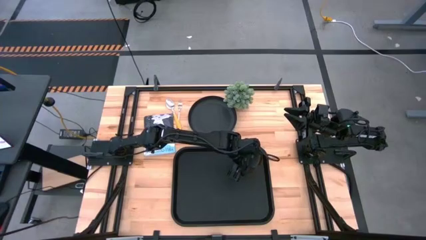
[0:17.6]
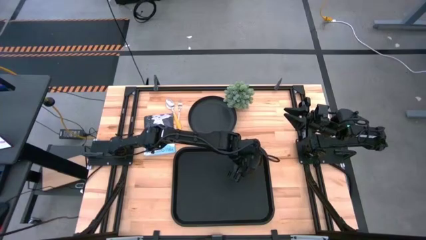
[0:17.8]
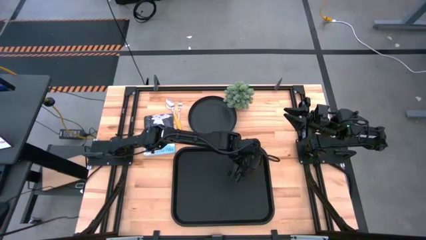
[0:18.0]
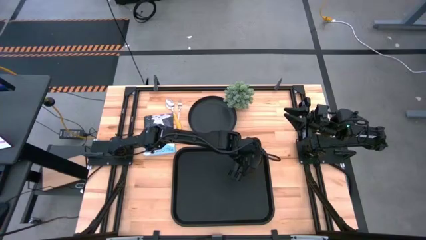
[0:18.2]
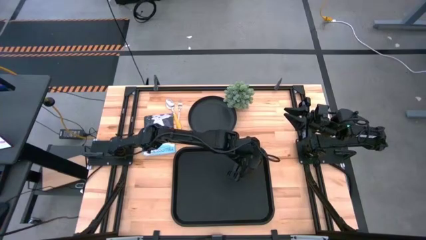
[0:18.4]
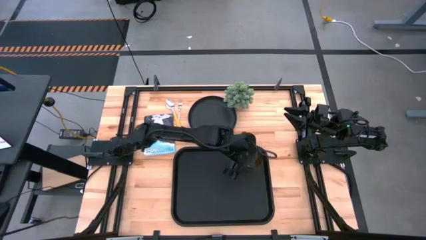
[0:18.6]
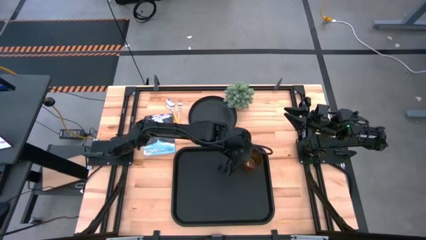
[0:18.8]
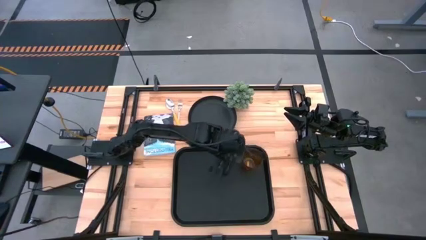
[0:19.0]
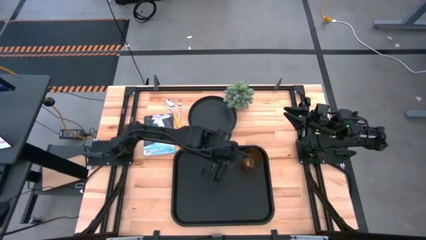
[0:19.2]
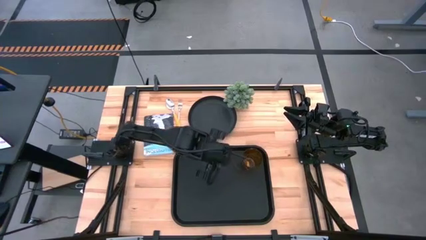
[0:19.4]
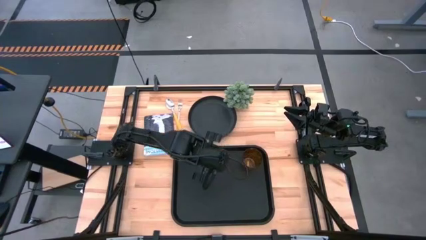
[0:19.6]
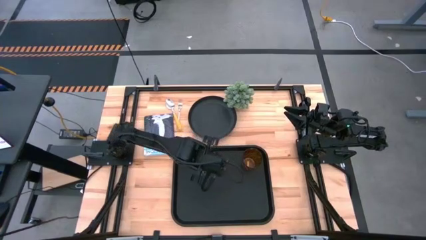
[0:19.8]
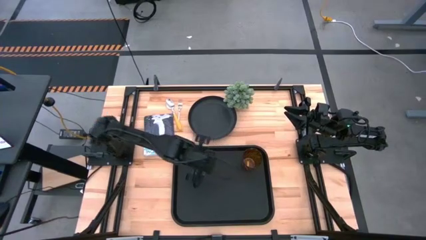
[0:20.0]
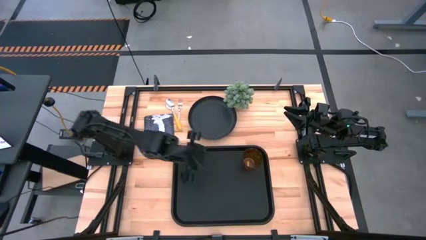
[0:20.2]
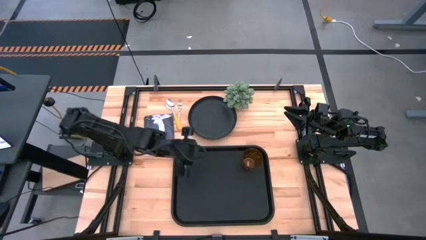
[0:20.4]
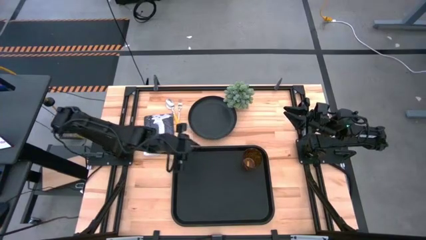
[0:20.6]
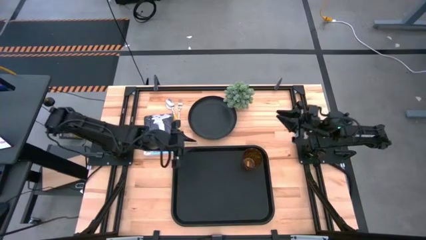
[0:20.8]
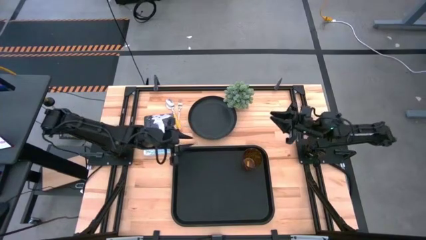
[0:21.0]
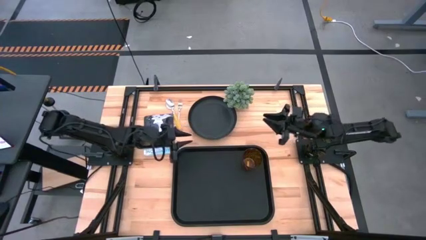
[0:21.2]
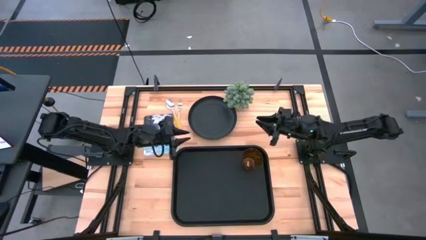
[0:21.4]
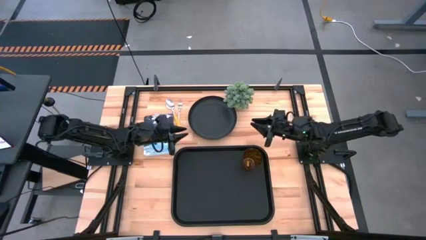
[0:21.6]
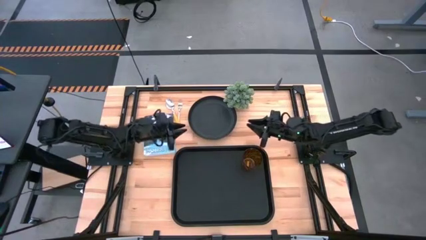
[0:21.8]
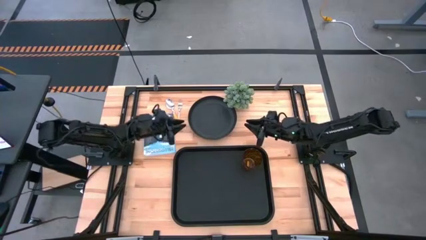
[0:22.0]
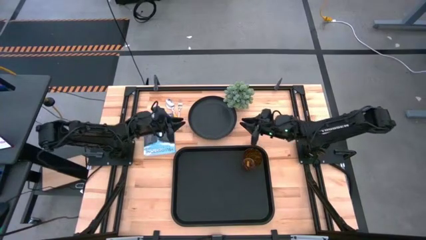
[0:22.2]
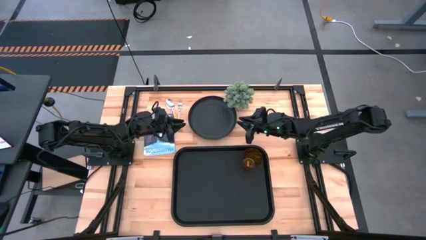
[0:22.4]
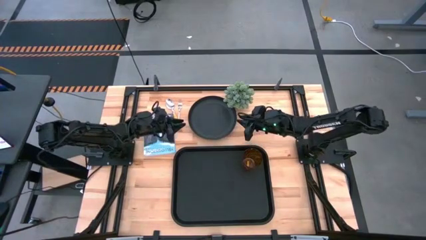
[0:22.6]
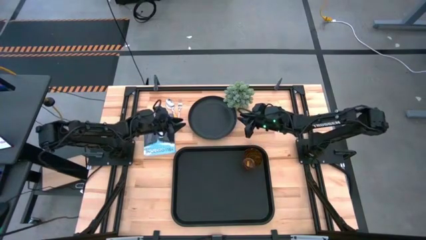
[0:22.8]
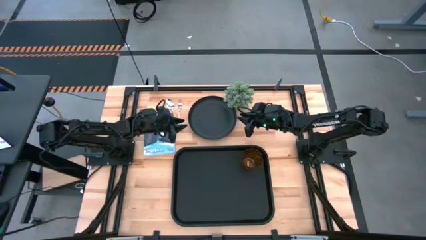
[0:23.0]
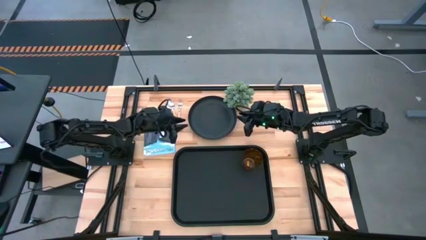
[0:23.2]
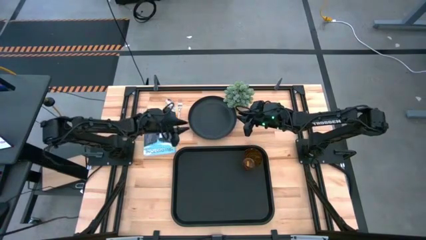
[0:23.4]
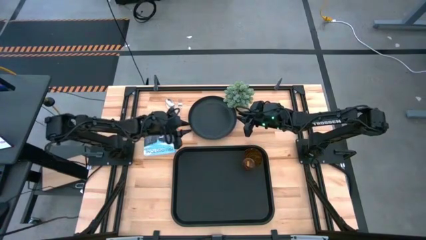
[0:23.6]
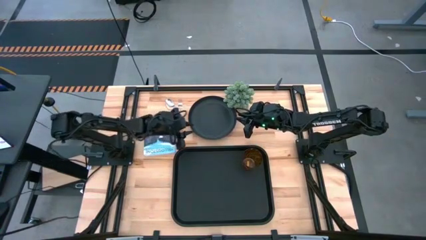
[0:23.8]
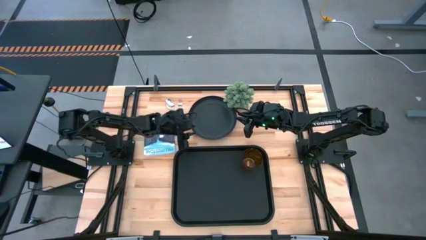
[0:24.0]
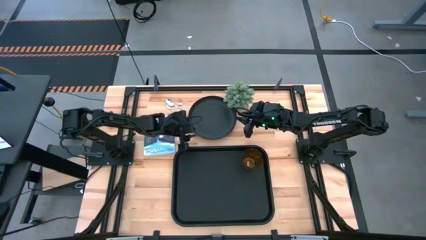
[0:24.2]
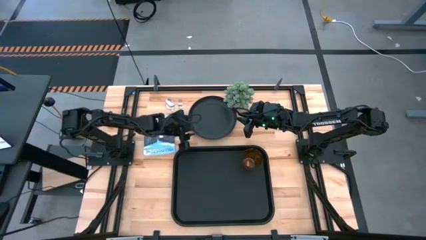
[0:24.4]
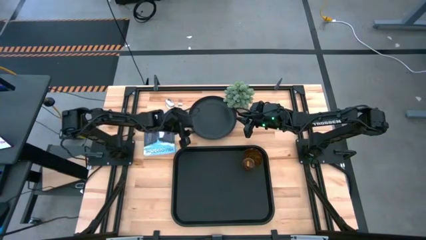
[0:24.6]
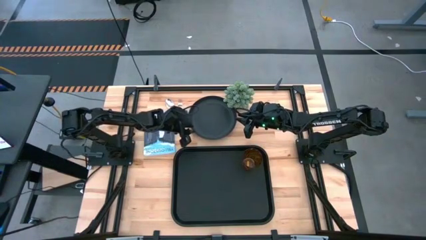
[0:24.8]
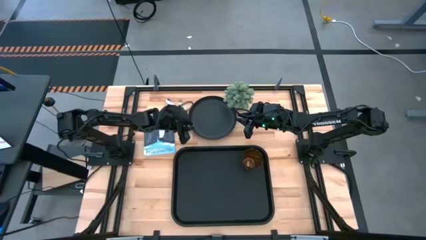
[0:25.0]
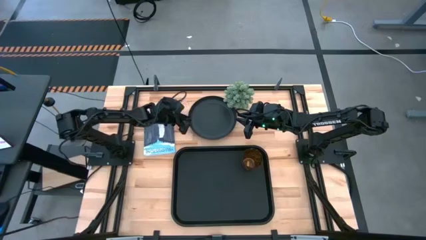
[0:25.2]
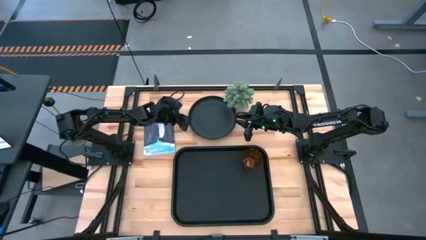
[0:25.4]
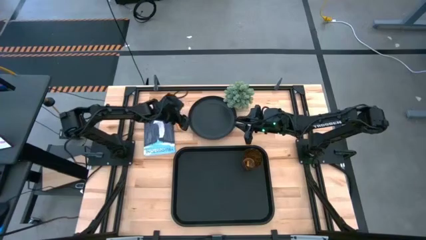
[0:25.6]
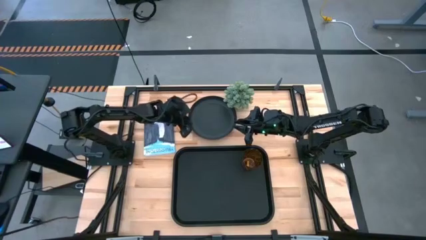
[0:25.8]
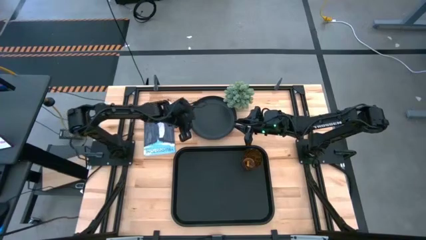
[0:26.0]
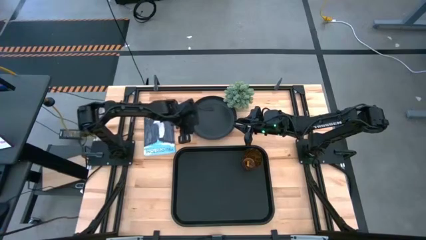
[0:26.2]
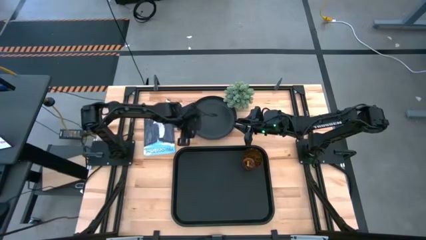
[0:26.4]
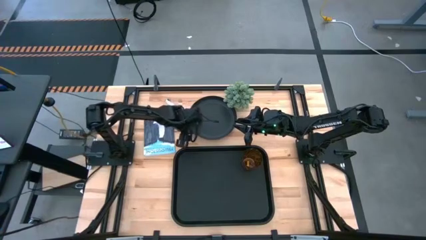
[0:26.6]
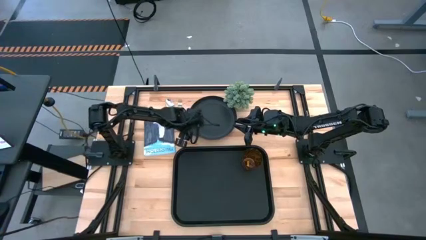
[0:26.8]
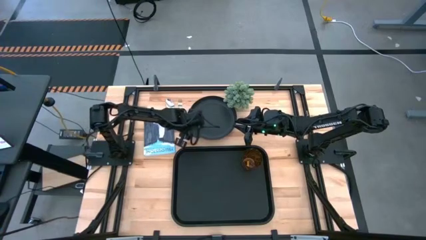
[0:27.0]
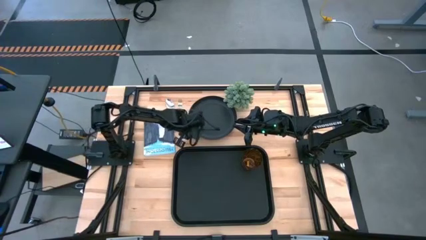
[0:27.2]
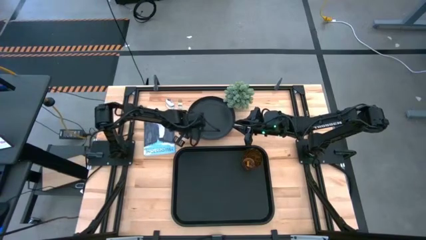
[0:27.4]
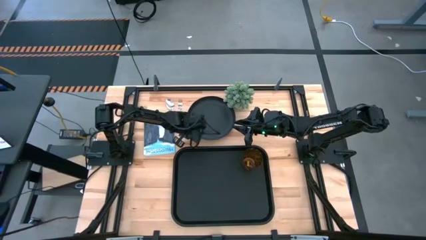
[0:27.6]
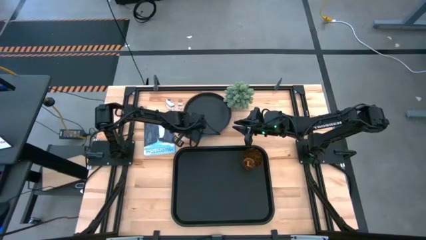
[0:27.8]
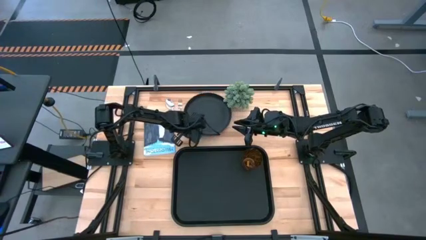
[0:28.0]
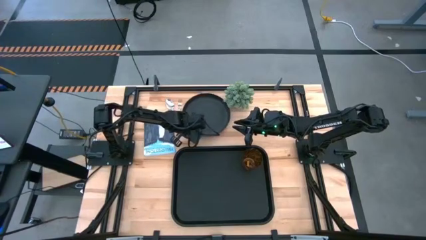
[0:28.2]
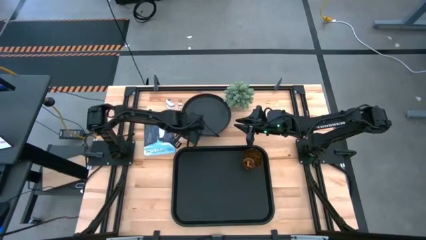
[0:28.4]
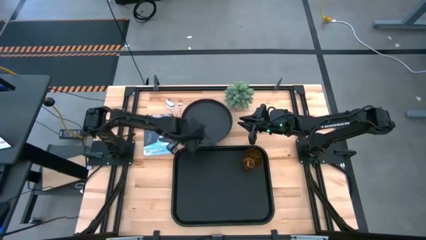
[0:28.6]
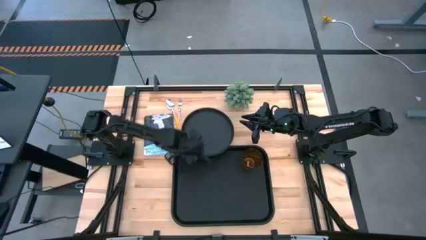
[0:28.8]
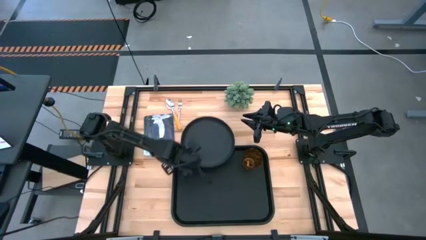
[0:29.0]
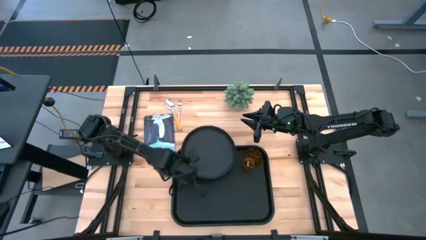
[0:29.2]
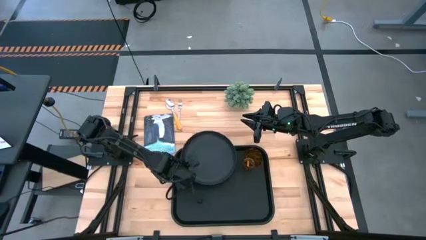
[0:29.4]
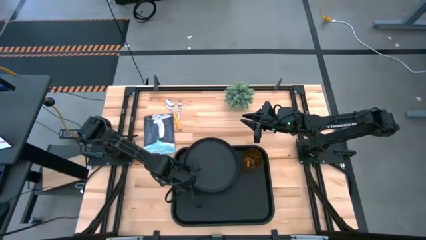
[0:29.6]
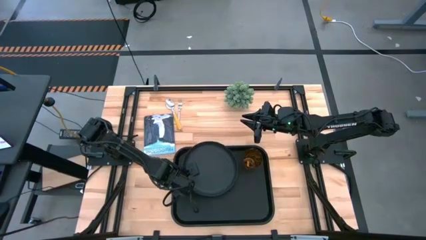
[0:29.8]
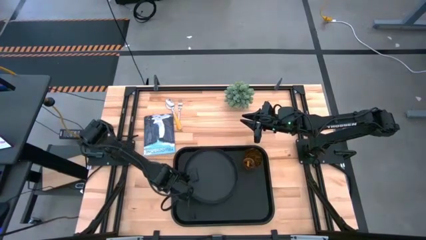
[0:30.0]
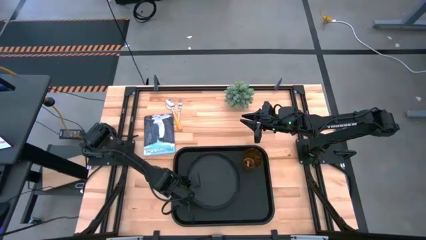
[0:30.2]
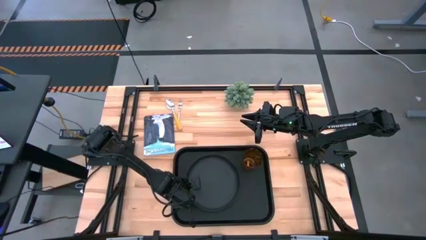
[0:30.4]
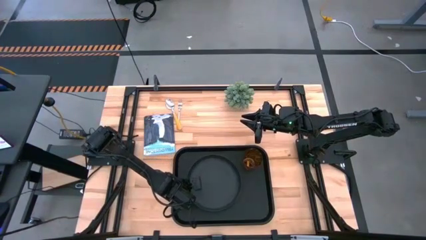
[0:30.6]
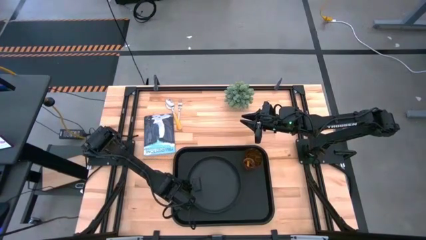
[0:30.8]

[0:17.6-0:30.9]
Task: Pick and place plate/cup/fork/spoon on tray
Put the black plate on the black tray to the bottom left of the orange glass
